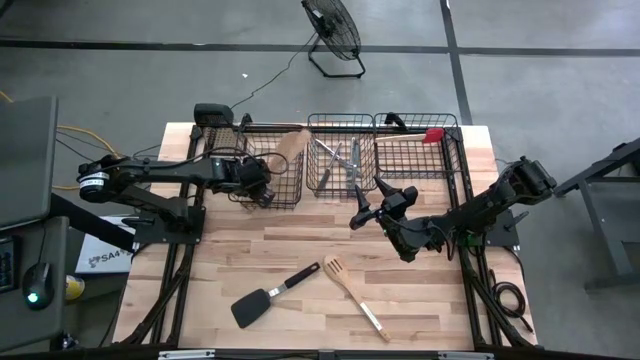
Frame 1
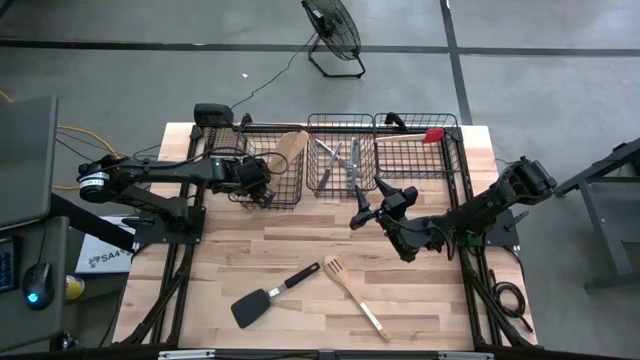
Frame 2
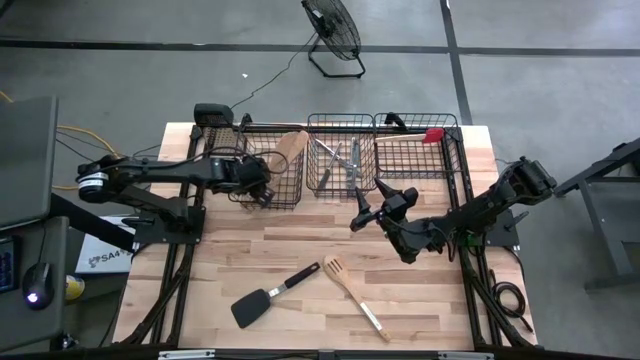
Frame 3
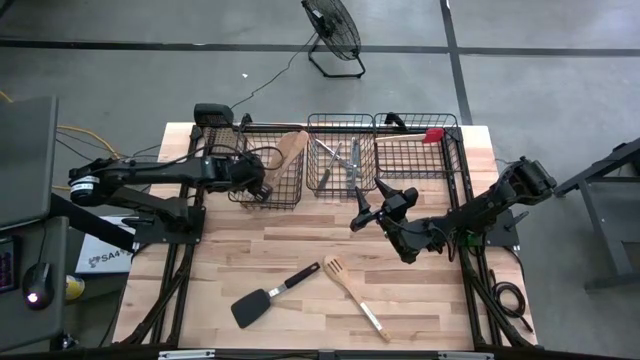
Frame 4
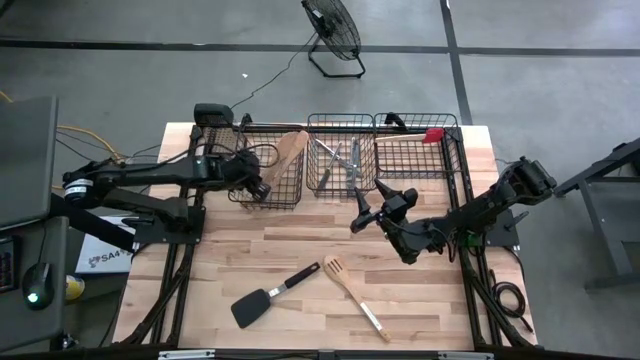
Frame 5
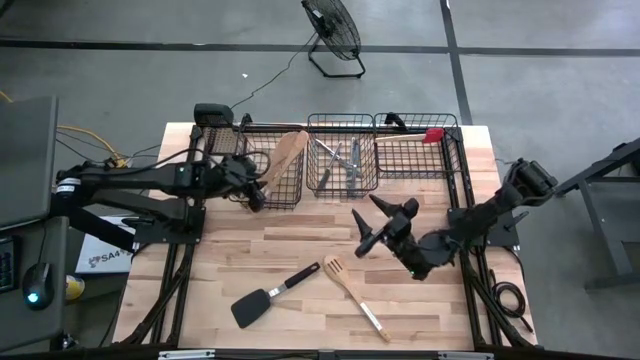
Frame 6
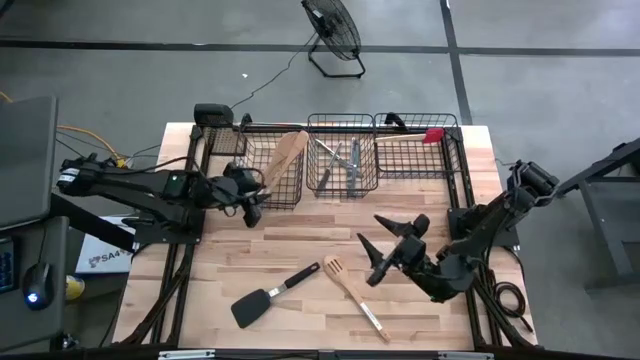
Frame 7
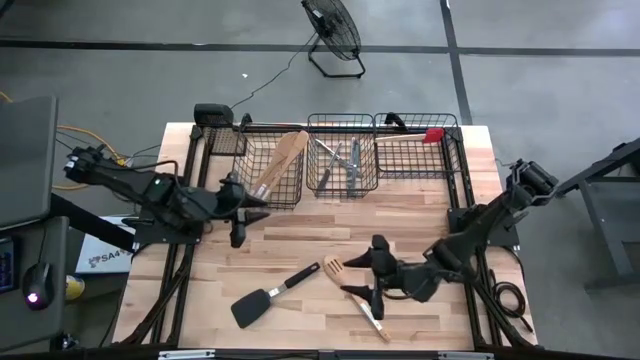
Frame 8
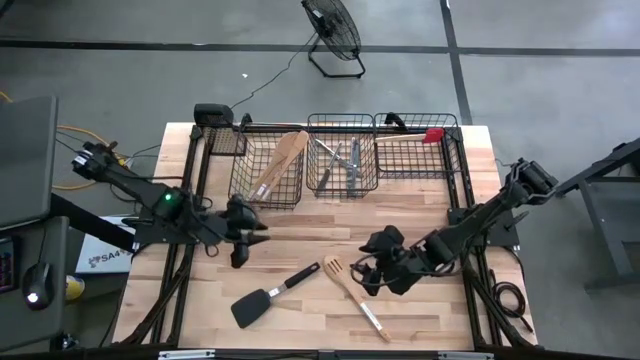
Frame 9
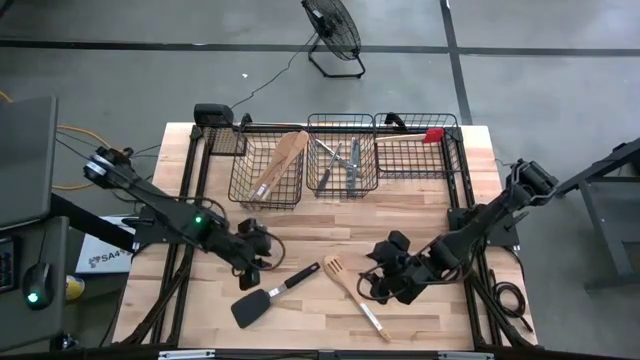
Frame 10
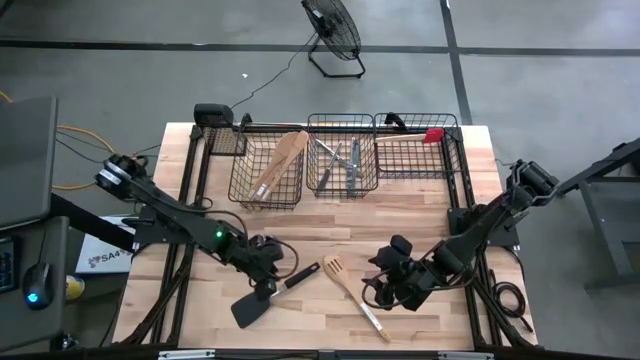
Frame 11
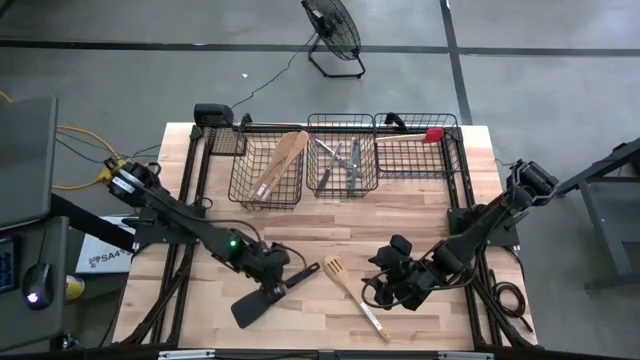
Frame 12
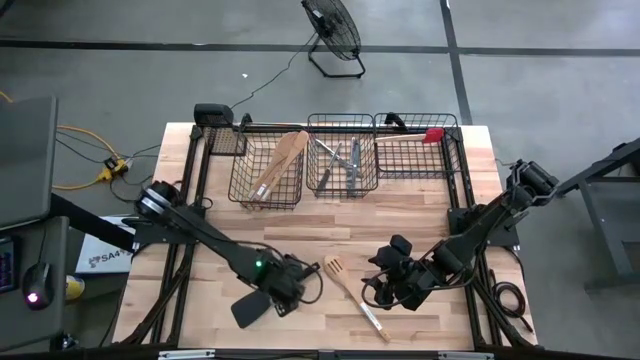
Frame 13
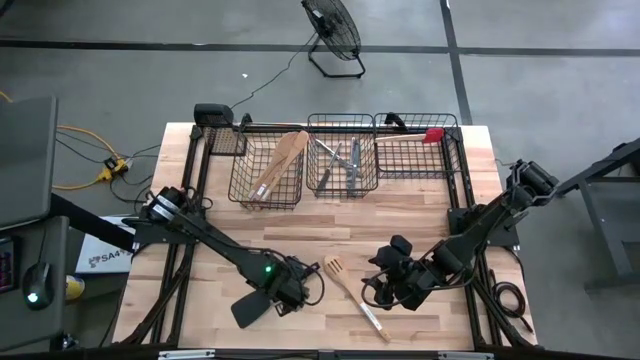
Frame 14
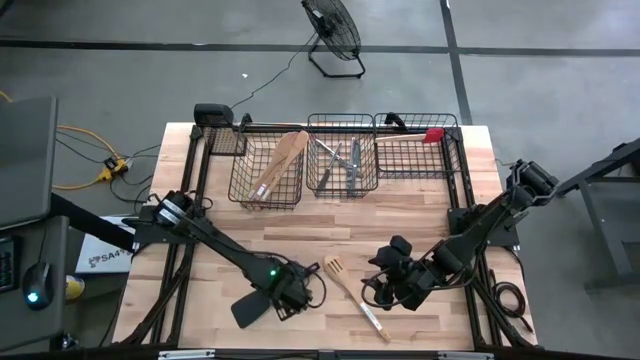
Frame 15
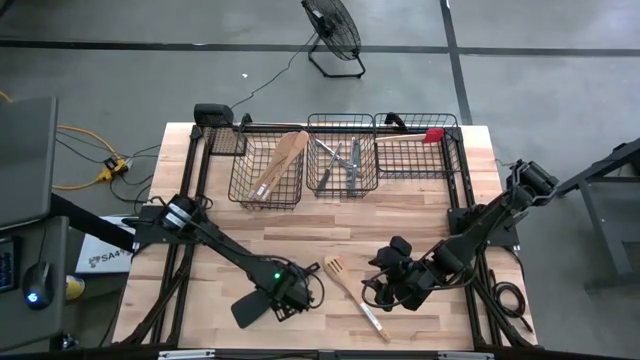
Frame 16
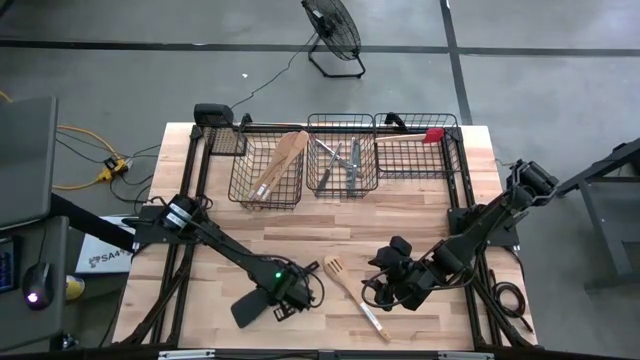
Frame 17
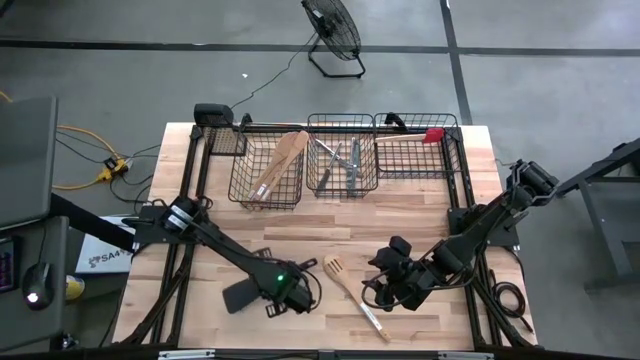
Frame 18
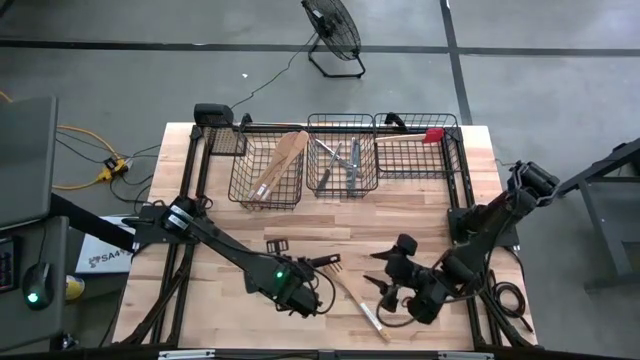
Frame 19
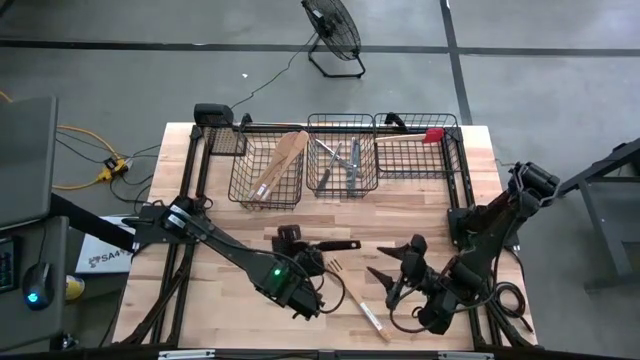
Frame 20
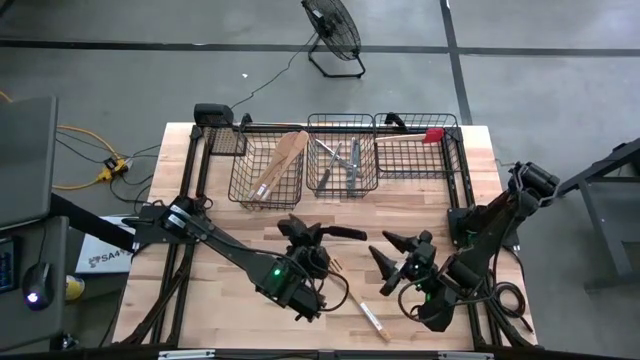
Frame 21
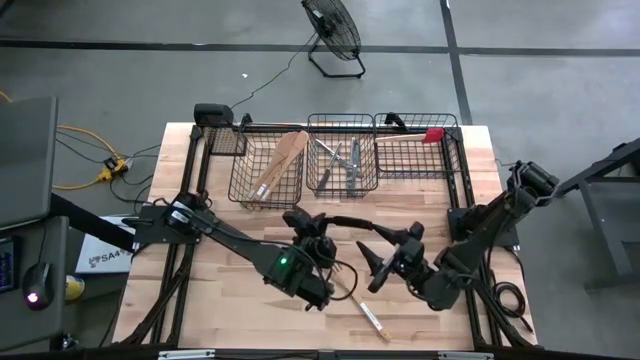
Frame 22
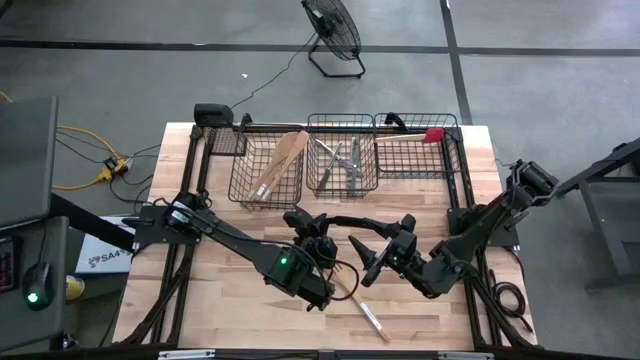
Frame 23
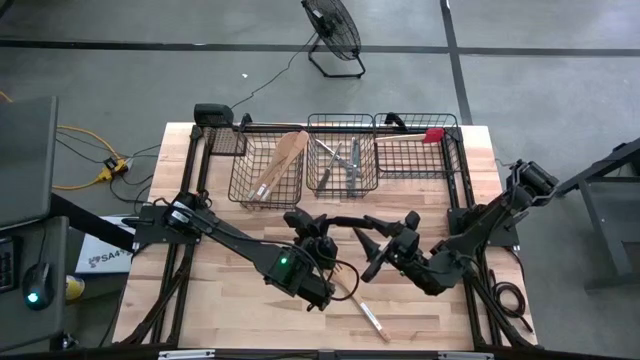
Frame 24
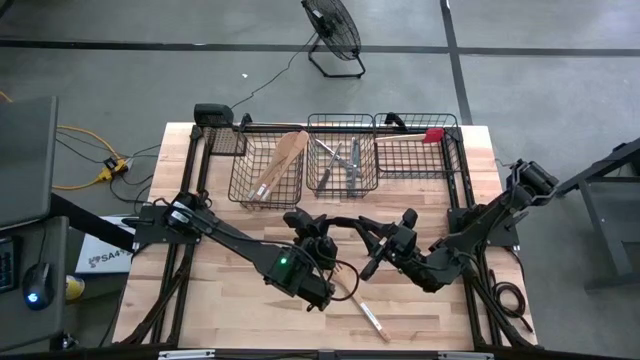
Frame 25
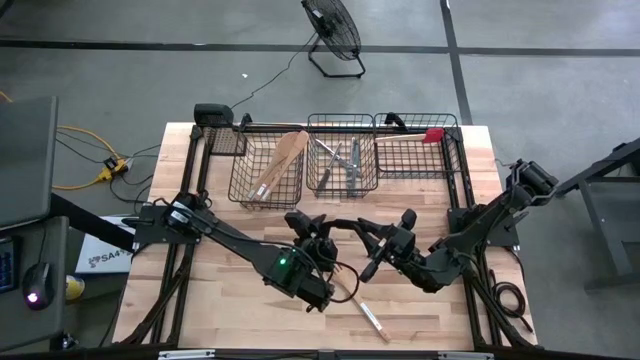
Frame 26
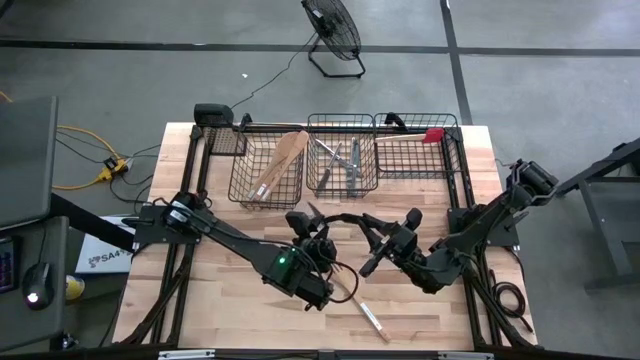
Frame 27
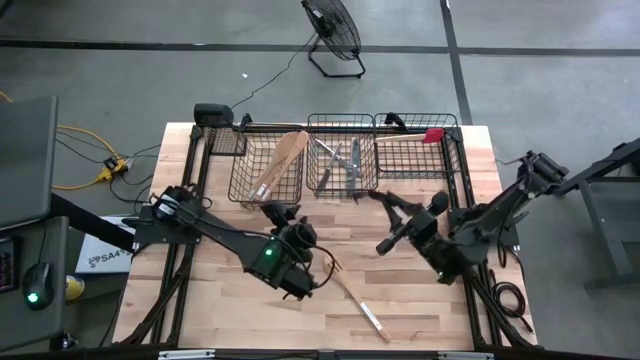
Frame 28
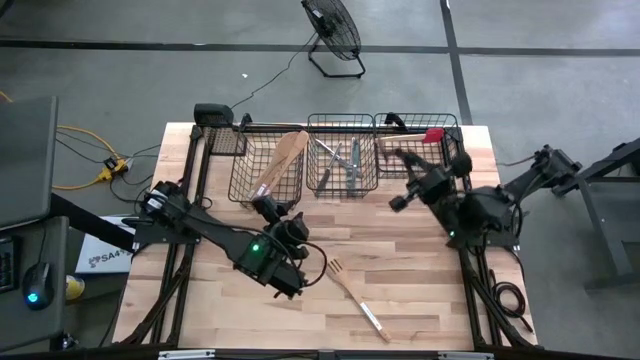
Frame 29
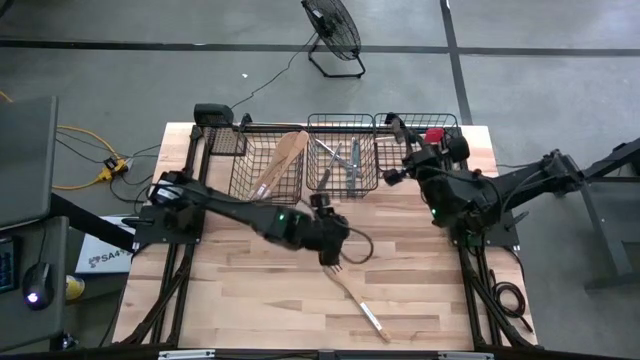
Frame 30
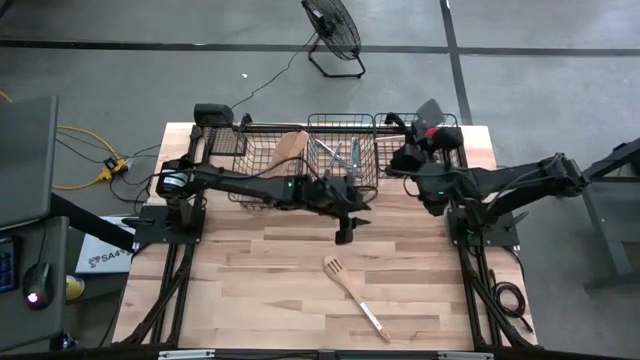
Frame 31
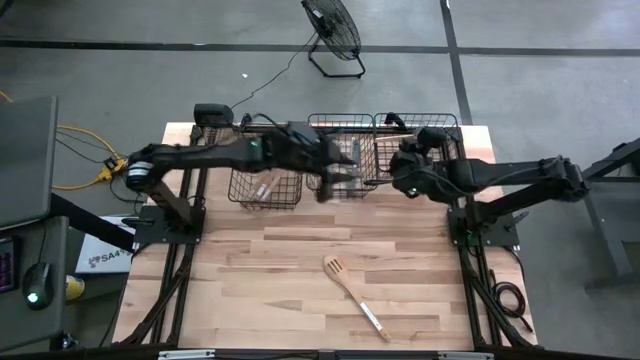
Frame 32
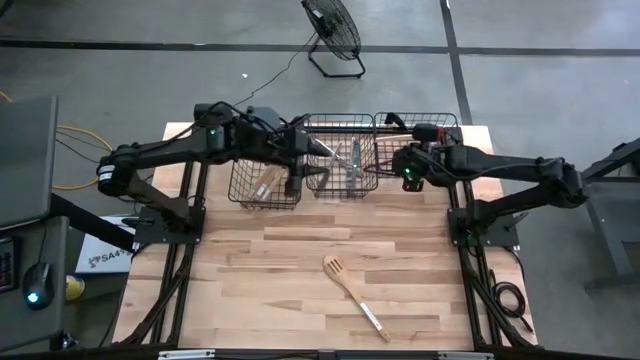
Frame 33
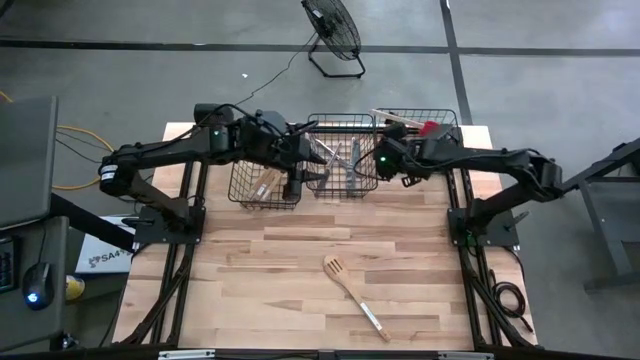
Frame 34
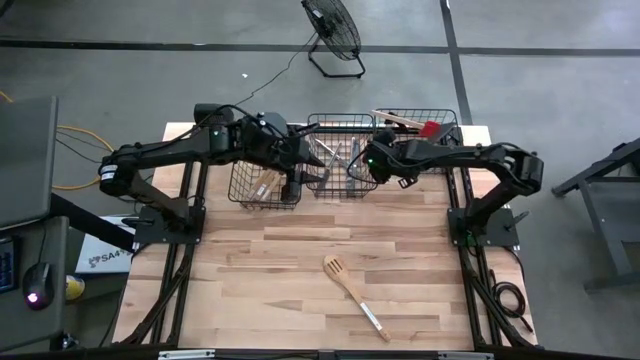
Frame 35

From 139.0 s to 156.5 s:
Task: Pick & Place Kitchen Items
Put the black spatula into the right wire basket
